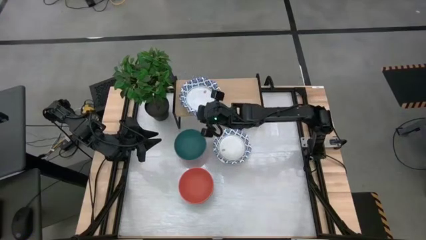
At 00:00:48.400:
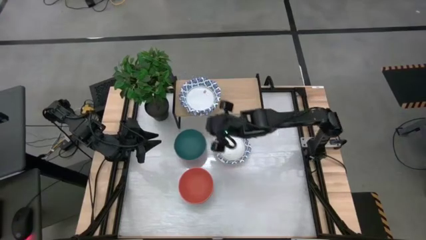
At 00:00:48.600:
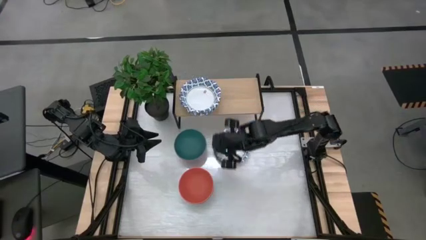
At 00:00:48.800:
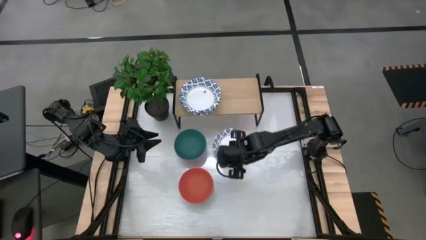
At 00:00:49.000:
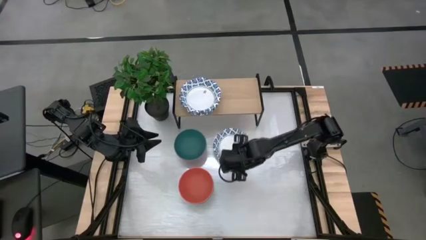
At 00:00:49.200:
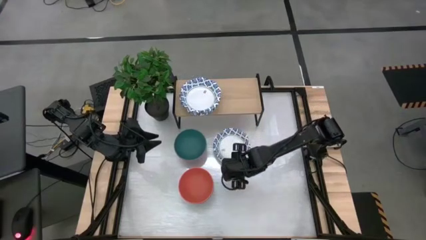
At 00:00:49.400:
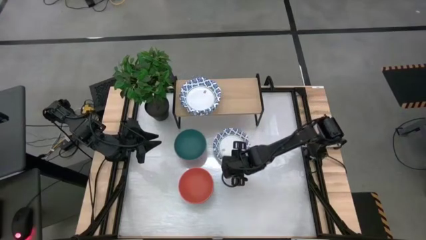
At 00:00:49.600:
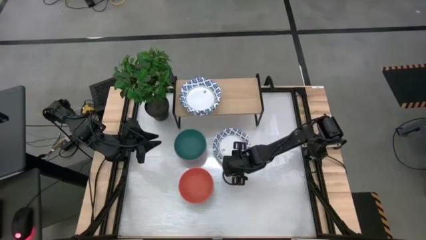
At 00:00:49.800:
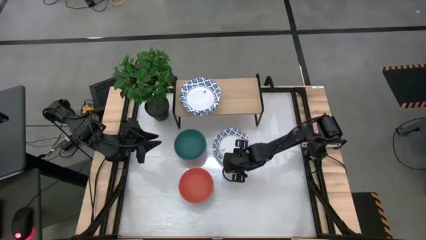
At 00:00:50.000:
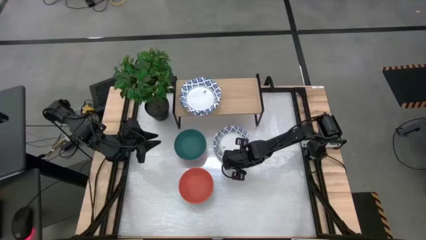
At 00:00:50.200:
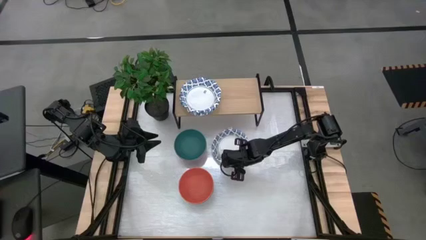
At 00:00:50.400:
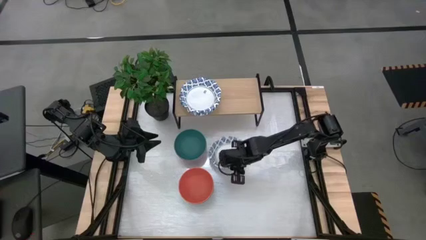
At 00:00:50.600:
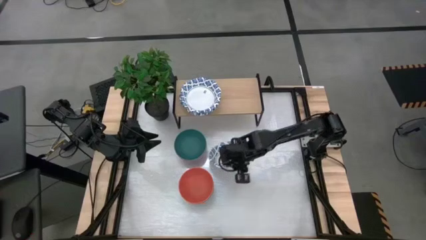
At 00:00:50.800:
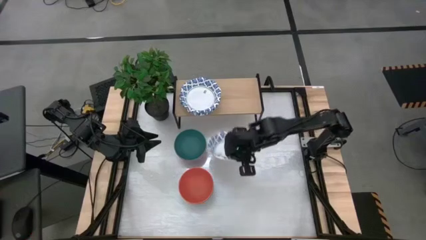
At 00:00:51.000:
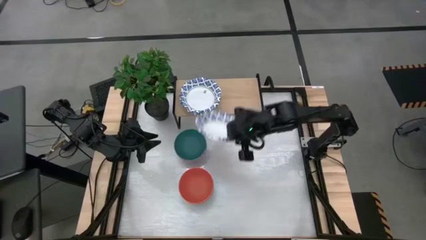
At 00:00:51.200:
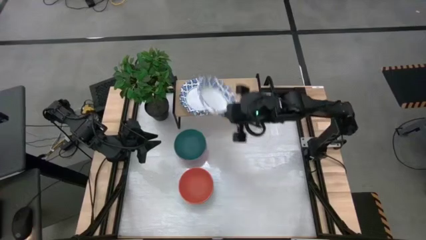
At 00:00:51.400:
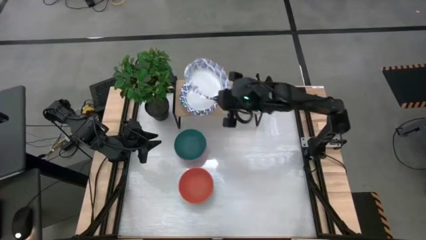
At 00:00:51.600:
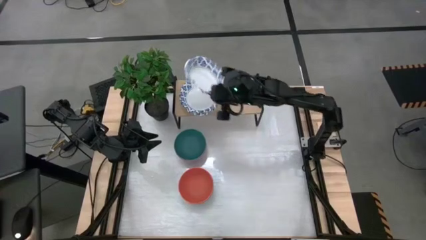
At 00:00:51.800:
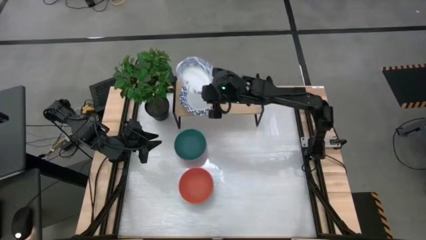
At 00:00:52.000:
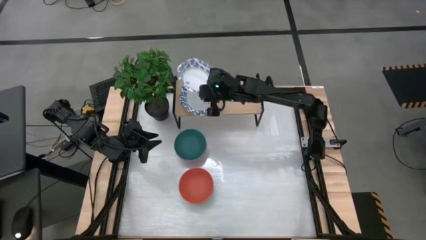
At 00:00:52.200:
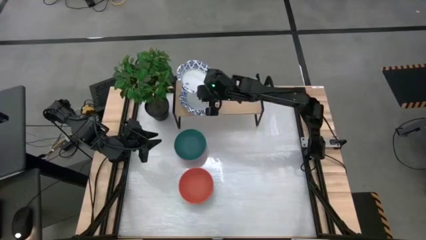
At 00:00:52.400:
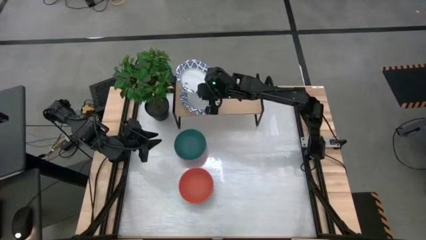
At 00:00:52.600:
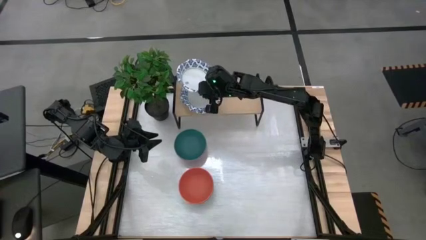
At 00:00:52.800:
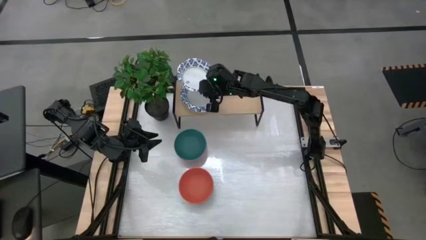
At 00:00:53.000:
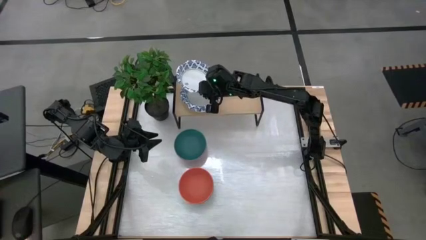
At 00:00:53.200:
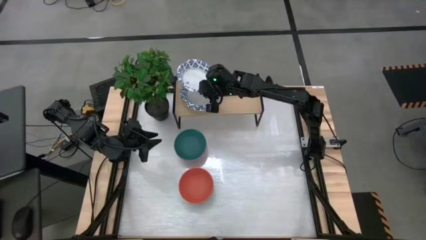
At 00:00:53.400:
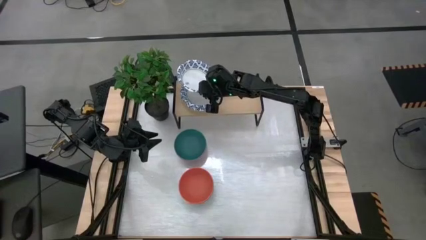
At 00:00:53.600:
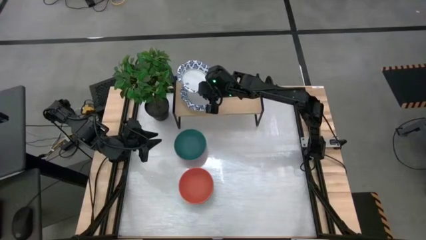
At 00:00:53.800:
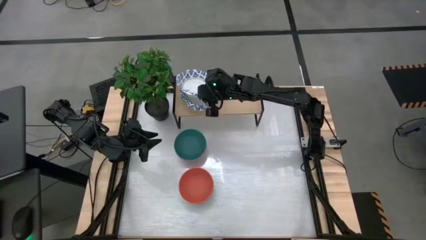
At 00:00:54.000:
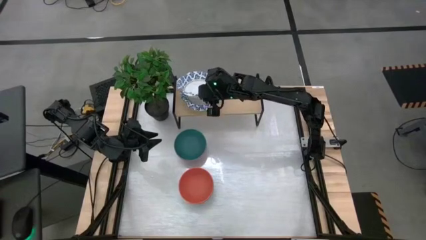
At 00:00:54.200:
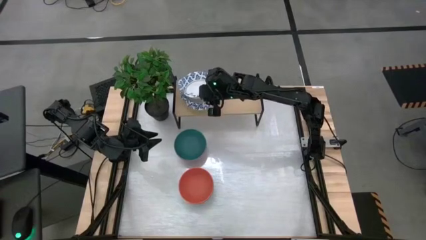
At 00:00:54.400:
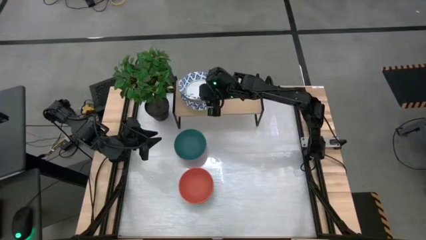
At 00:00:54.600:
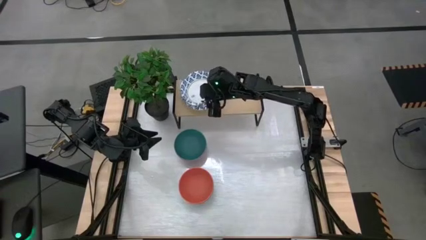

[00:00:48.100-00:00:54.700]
Task: Place and stack bowls onto a shelf
Stack the white bowl on top of the white bowl on the shelf

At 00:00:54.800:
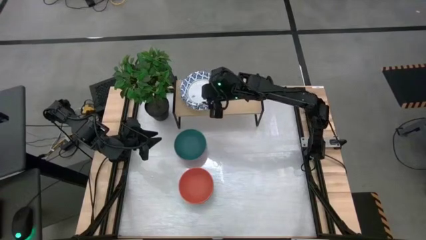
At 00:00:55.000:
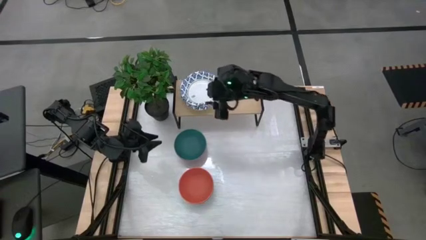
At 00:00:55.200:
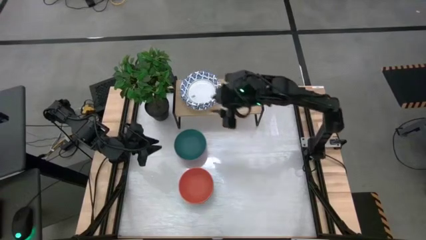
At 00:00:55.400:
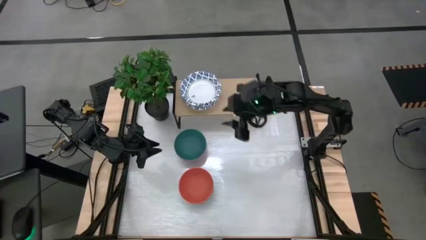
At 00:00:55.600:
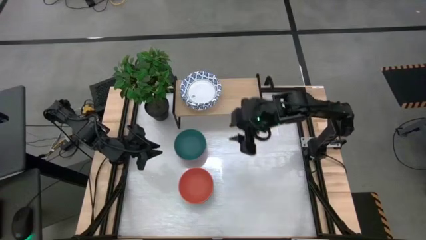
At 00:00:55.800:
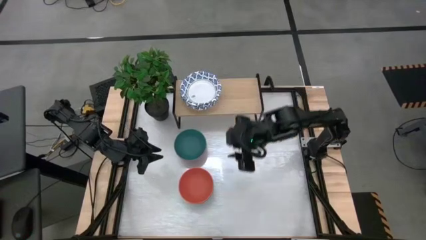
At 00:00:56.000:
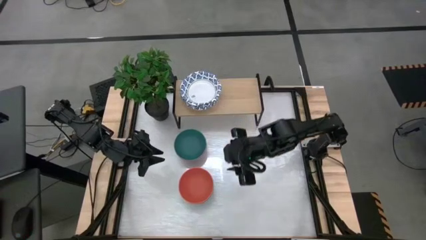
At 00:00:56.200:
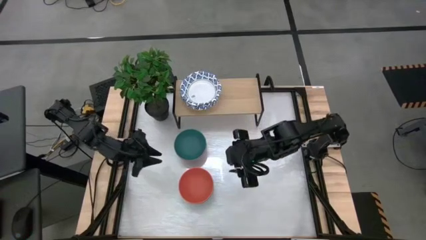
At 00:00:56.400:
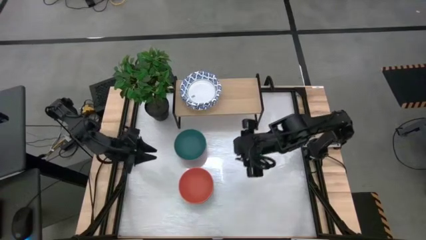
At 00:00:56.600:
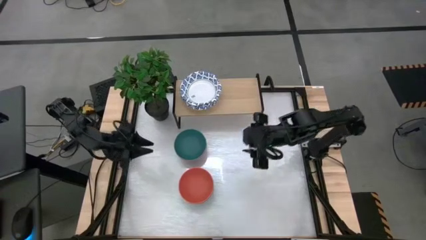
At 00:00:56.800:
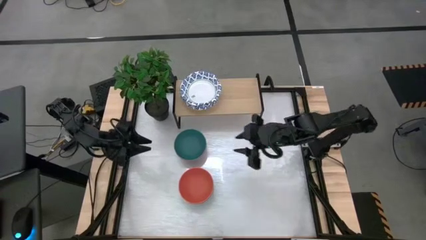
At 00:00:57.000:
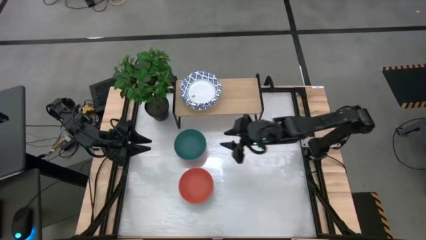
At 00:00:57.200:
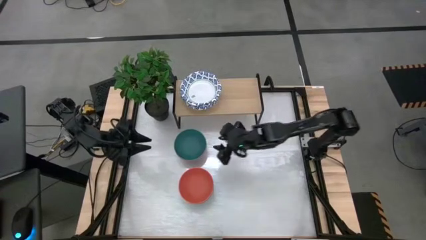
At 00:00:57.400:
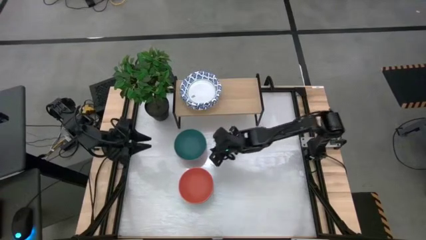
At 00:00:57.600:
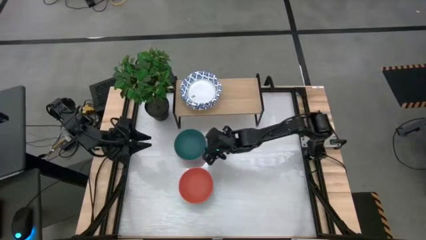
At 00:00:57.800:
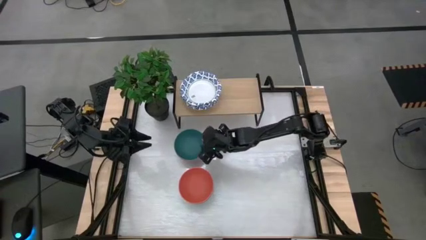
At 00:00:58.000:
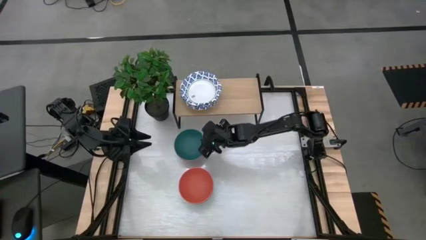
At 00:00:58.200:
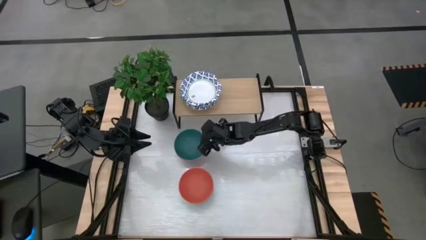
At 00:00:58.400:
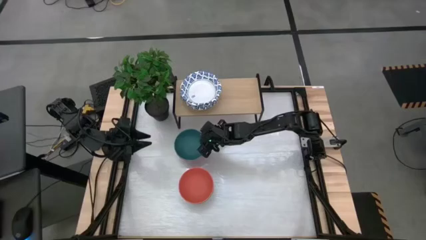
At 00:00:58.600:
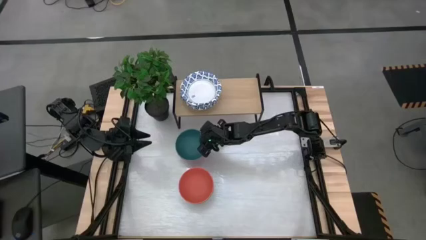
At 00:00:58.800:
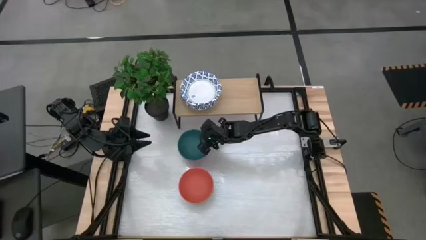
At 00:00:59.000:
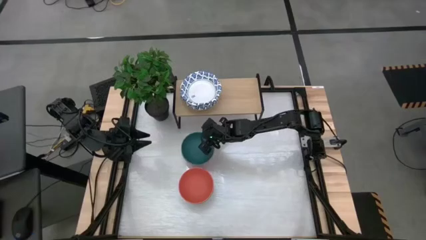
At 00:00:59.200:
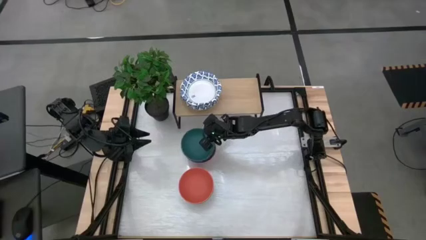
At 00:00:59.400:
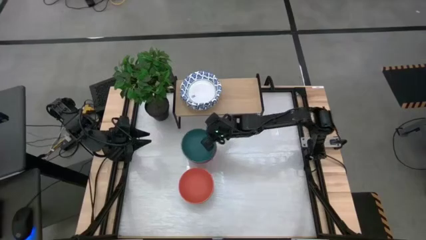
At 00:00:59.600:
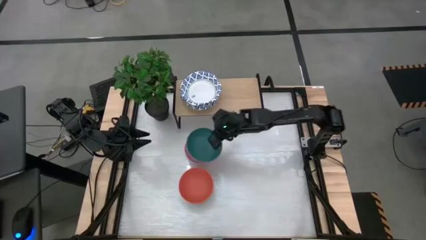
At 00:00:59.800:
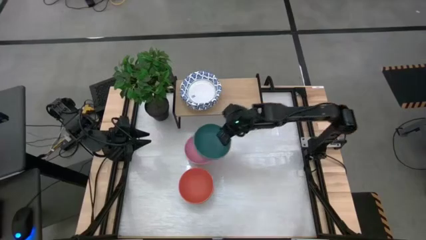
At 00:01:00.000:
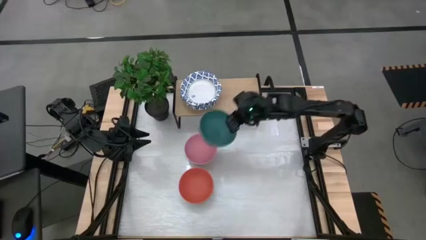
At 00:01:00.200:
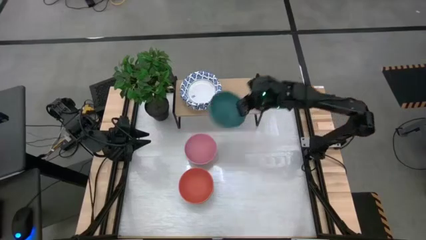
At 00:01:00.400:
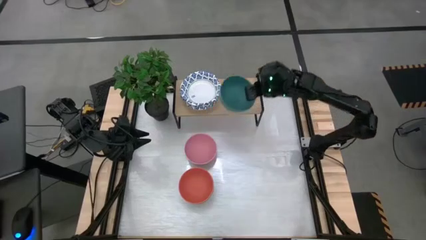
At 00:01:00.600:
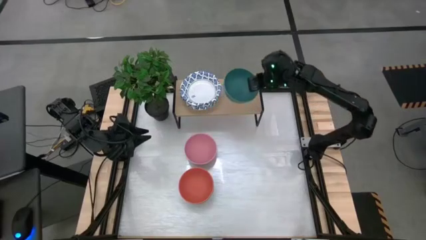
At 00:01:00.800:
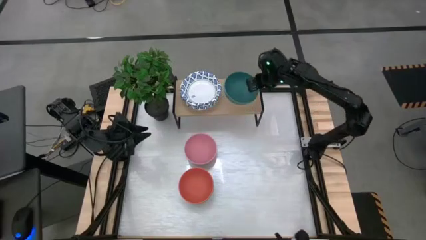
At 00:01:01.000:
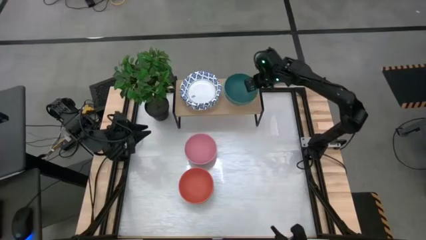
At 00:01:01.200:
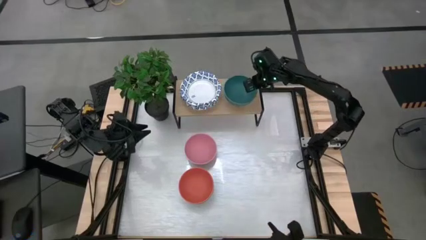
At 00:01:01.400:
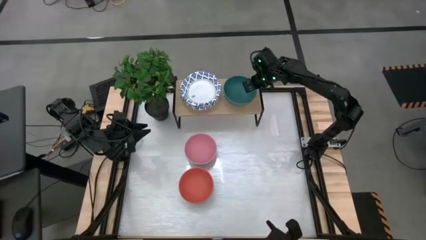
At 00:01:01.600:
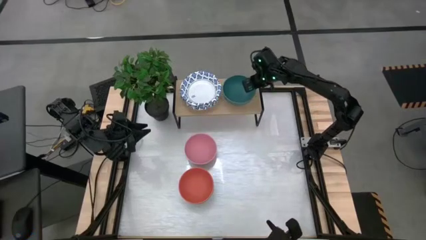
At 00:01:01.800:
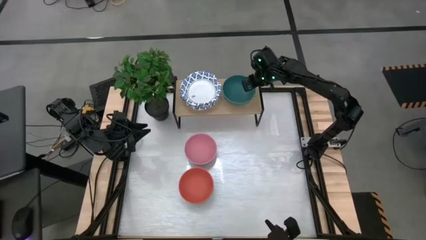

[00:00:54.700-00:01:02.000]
Put the dark green bowl on the shelf

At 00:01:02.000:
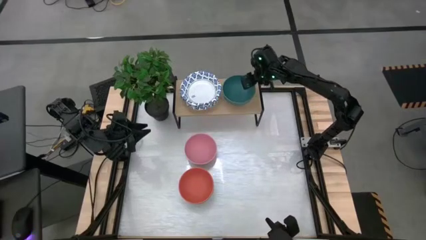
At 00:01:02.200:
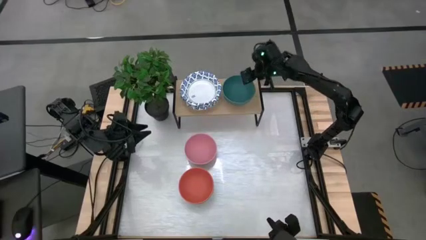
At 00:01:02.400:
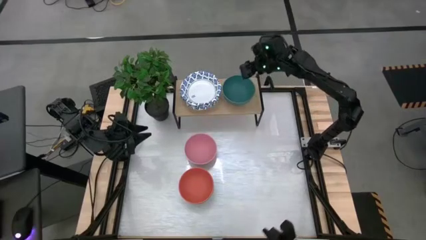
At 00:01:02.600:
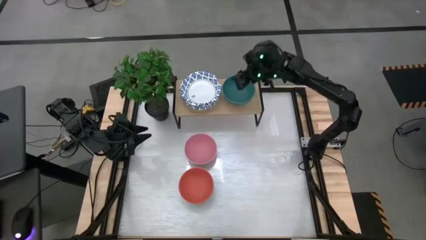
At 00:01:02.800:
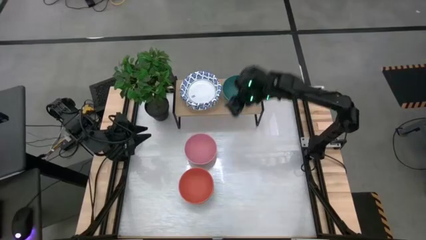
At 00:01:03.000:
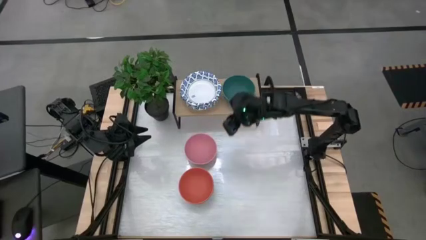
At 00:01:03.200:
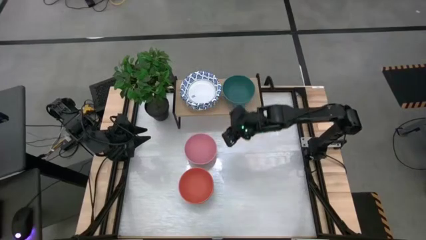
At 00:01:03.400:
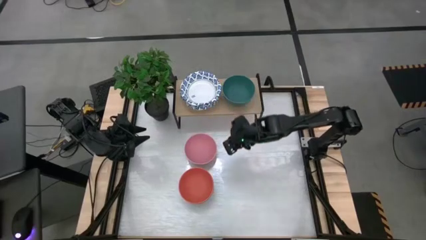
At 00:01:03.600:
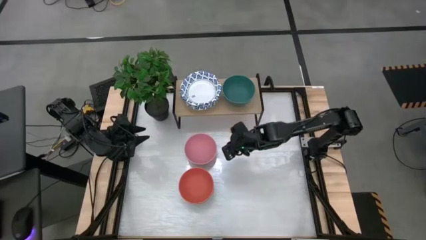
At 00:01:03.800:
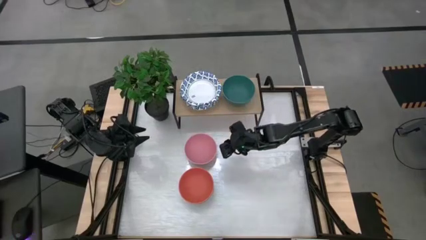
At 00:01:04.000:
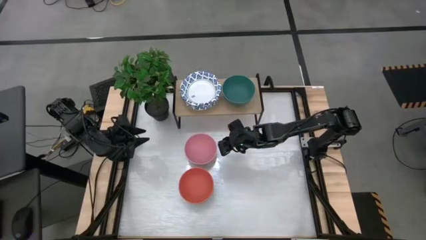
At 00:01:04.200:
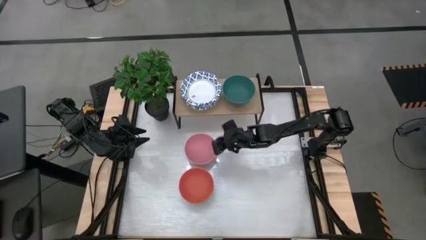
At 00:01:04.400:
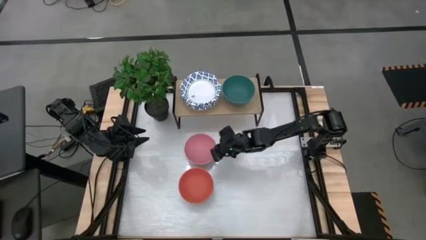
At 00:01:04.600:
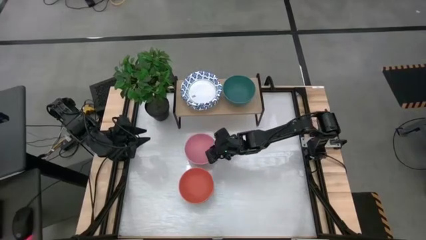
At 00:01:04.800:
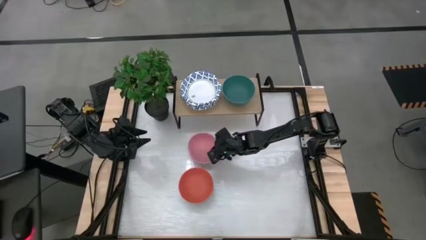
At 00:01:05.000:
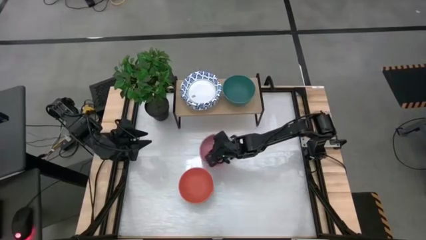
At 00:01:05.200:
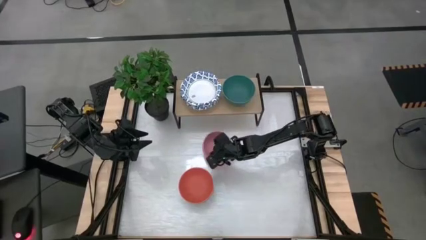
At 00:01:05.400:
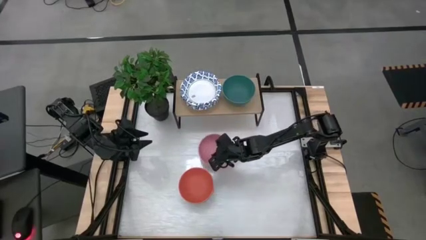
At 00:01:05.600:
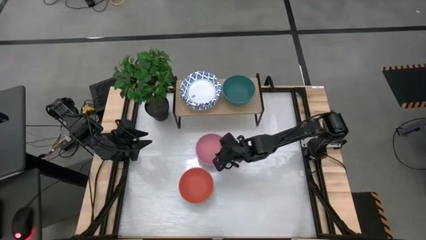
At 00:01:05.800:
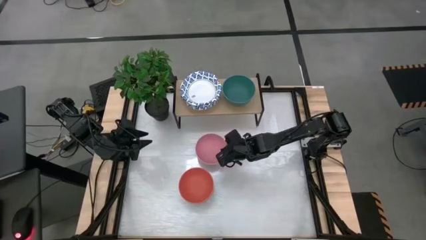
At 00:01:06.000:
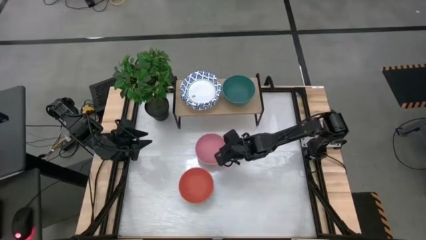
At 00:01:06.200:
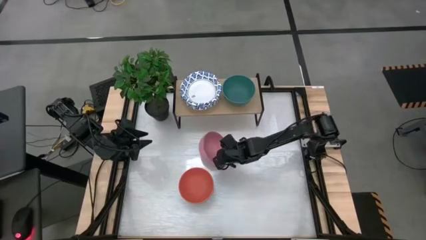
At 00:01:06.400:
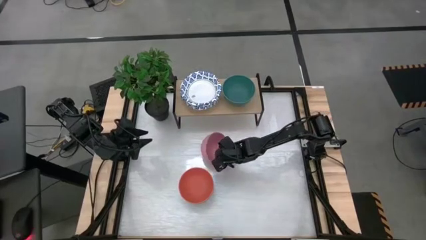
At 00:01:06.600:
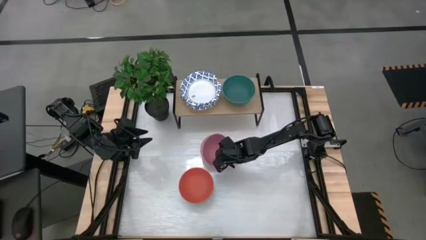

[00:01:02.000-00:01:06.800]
Stack the pink bowl on top of the dark green bowl on the shelf
